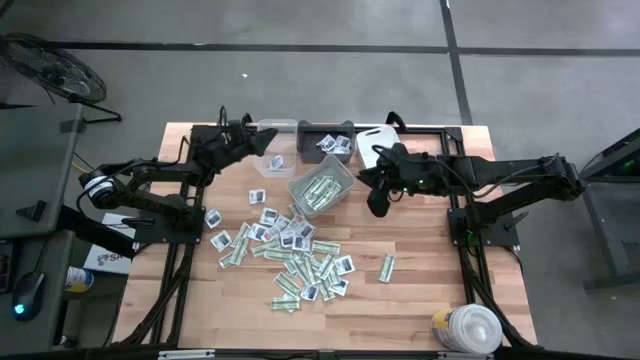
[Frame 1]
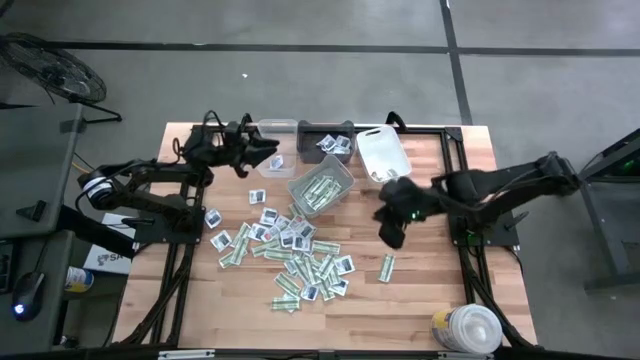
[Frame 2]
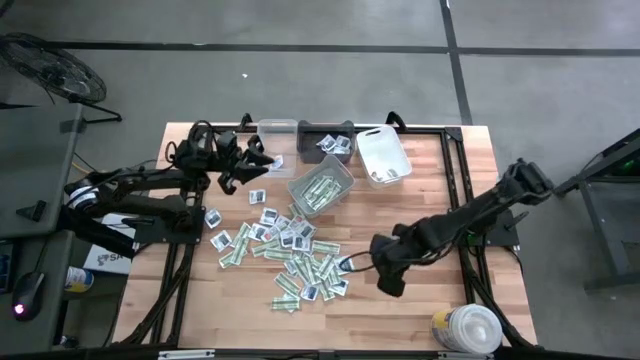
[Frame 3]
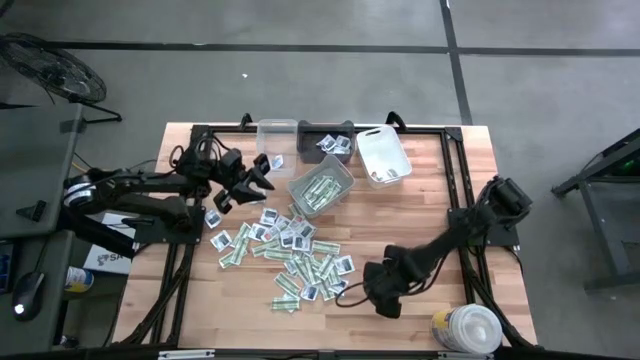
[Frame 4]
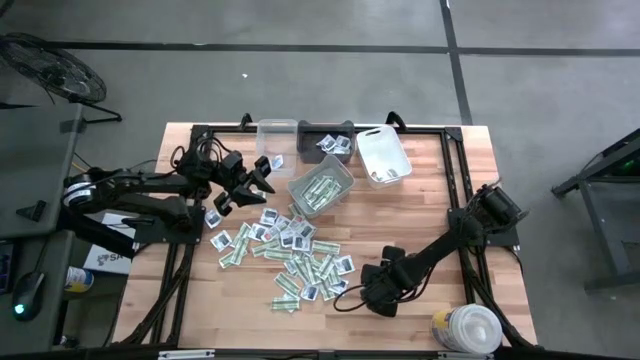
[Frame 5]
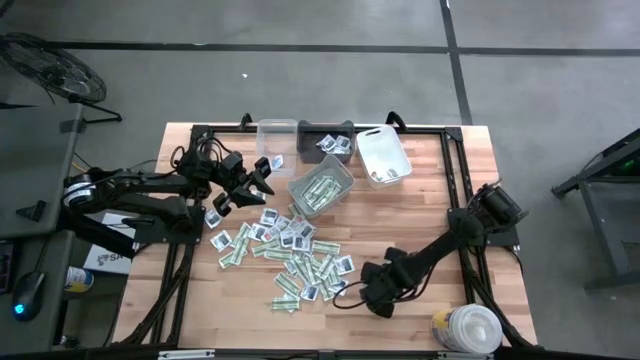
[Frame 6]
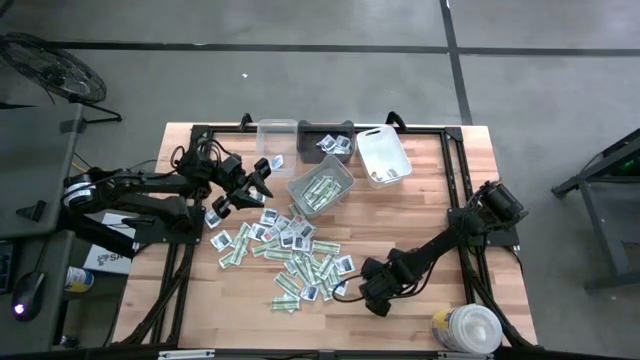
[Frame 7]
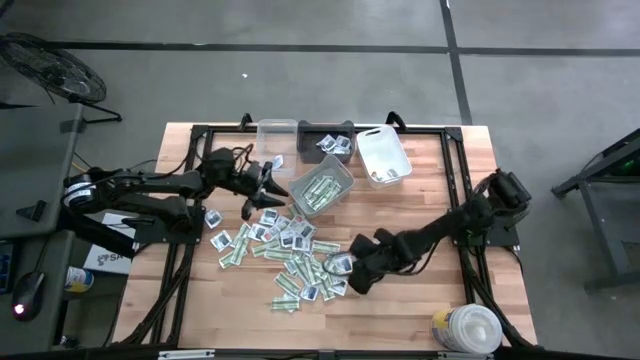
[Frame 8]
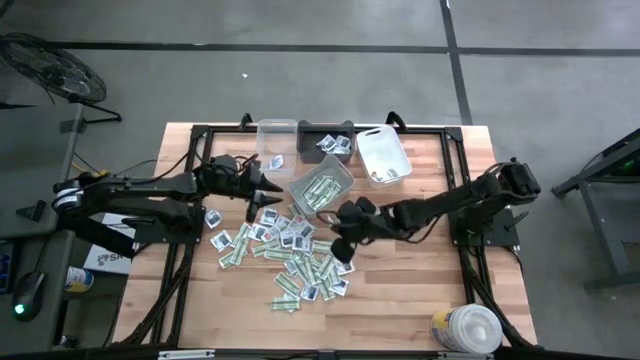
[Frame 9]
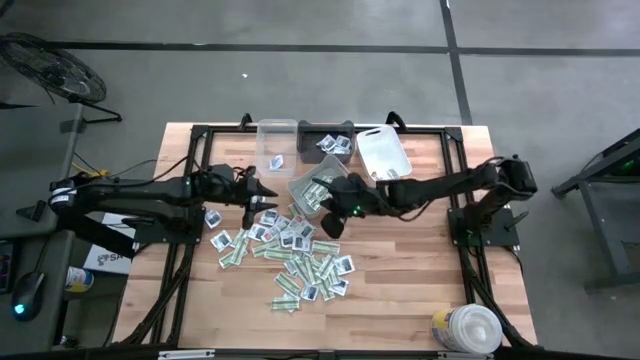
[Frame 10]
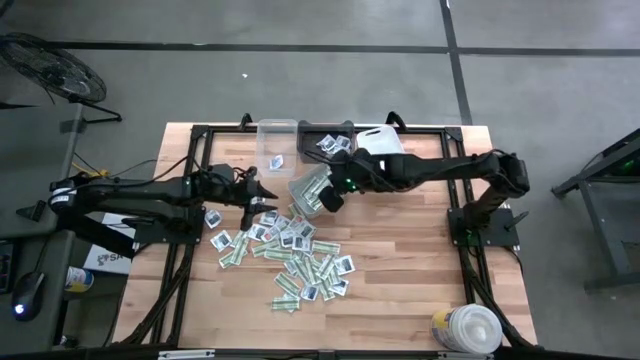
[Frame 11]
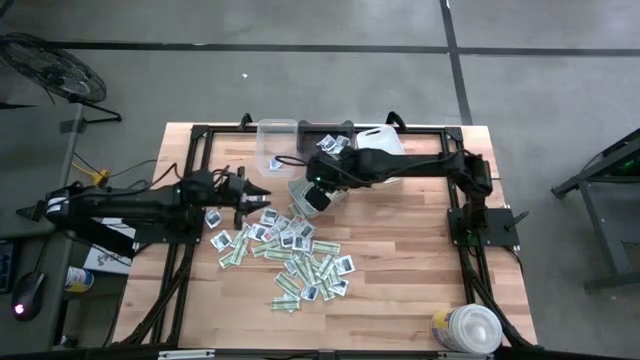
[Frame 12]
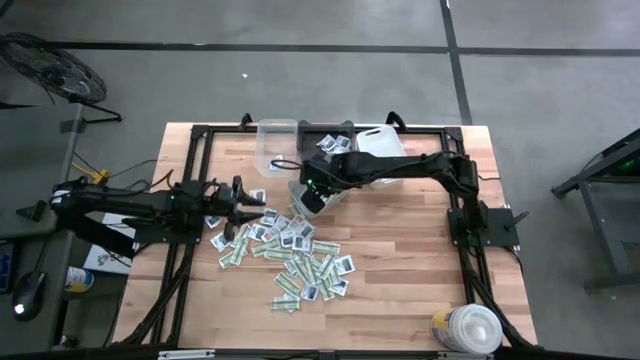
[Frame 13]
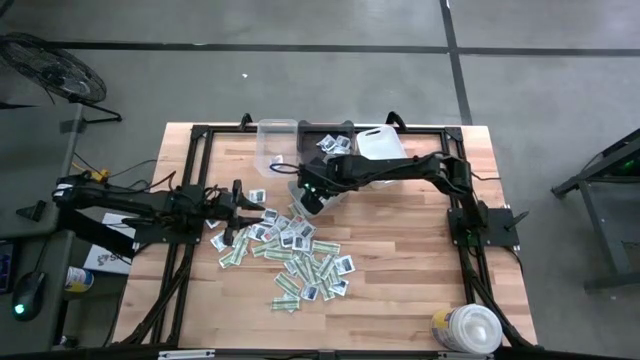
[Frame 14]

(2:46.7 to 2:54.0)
Task: Pick & Place First Aid Supplies
Put the bandage pack into the gray bin

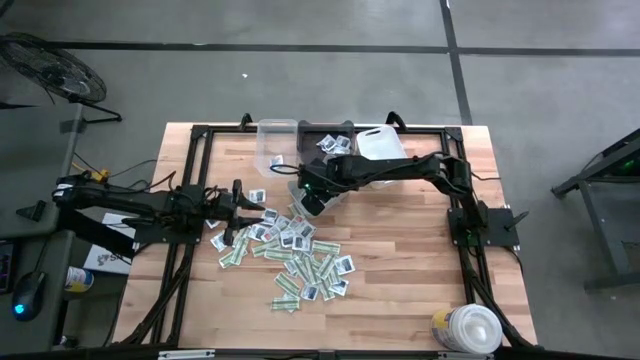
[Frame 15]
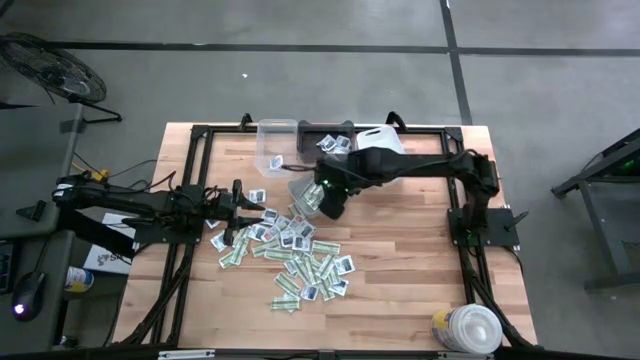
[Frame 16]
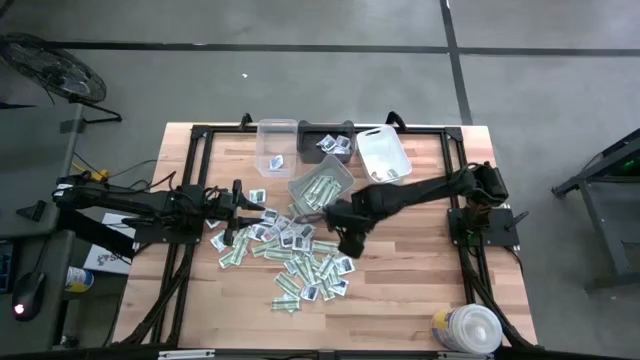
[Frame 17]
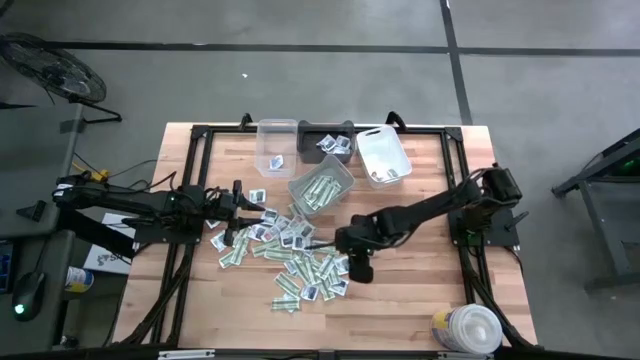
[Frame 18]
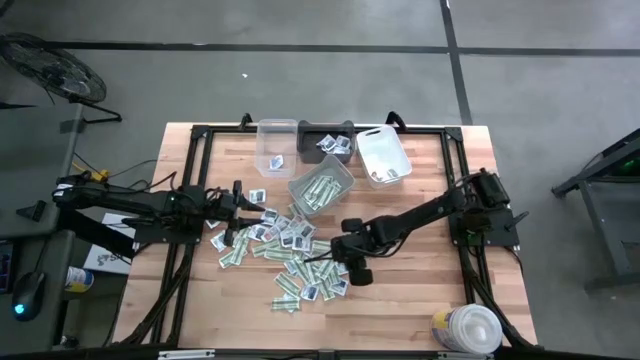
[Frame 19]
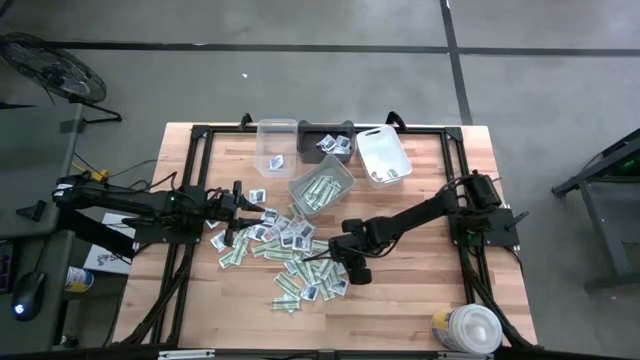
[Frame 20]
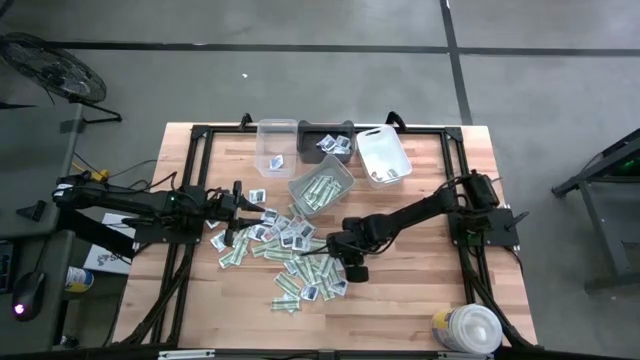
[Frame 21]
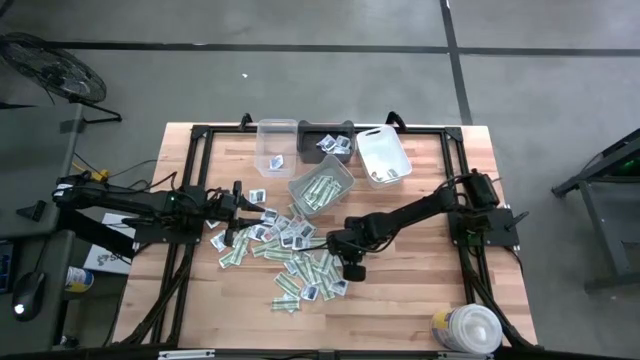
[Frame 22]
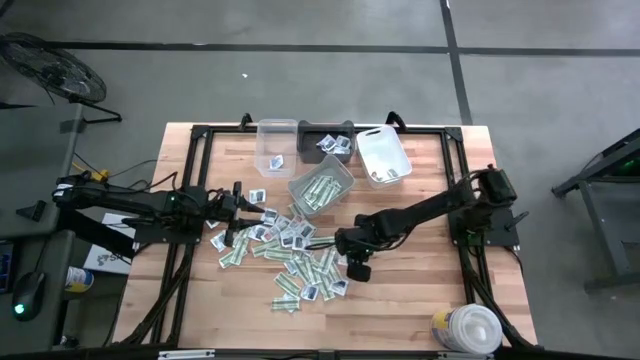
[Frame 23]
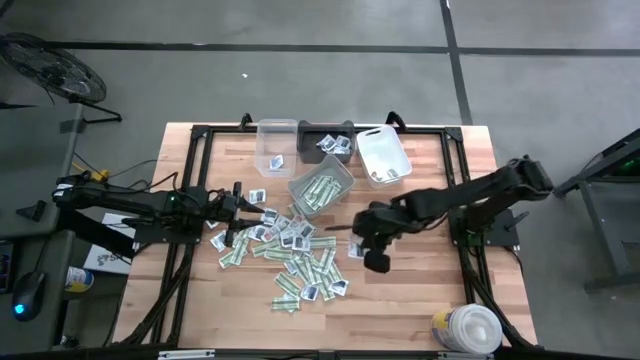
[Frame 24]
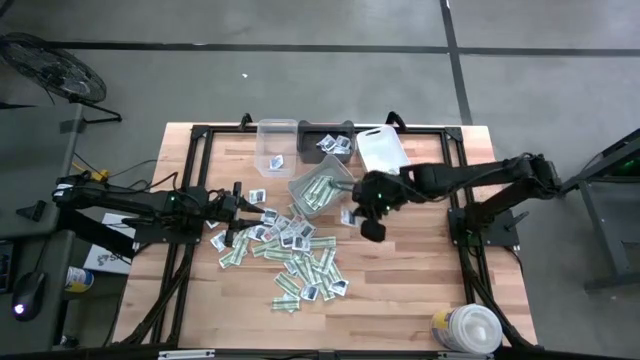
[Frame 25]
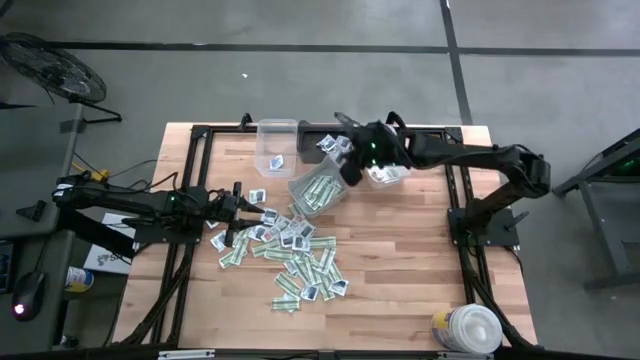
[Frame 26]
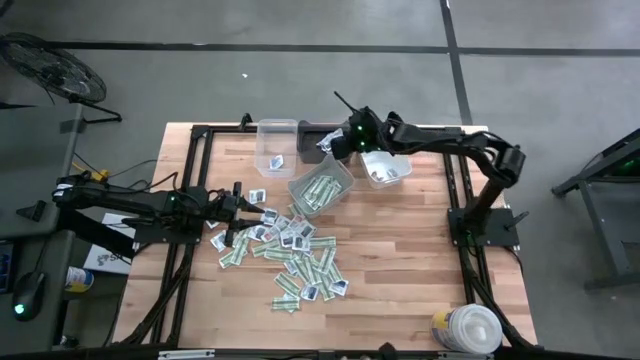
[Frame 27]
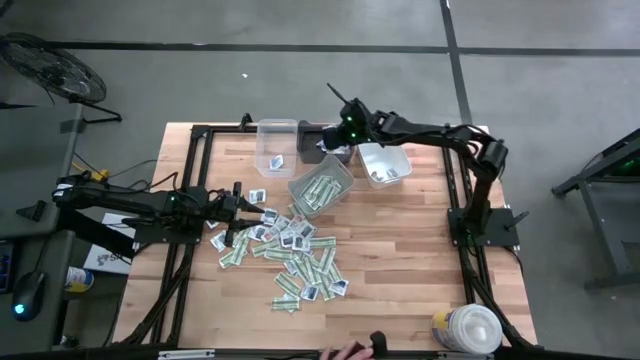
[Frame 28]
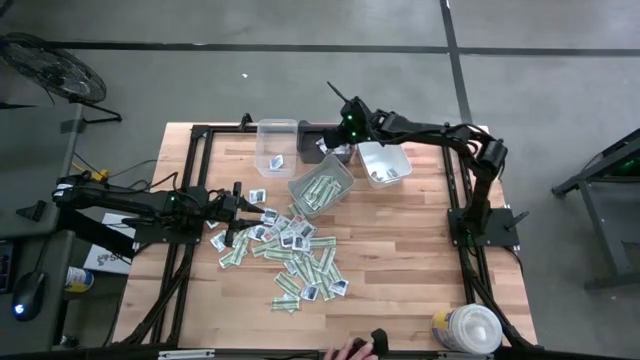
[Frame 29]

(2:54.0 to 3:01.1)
Put the towelette pack into the black bin

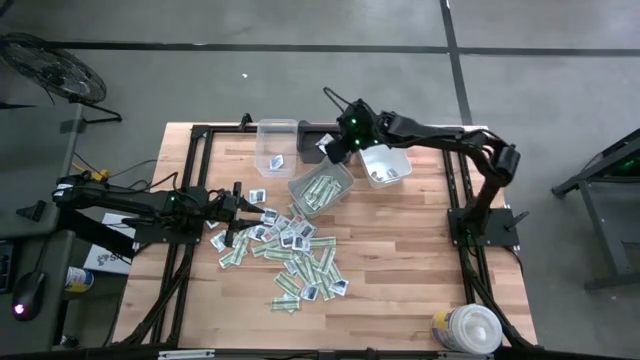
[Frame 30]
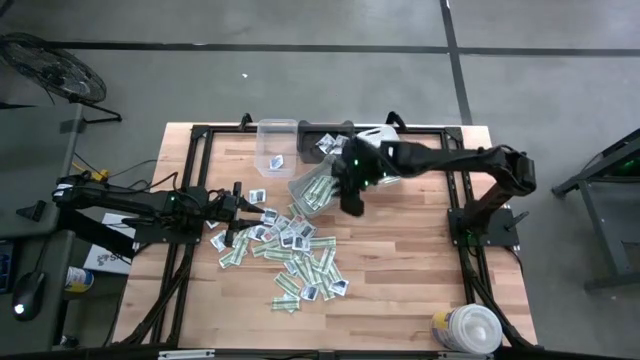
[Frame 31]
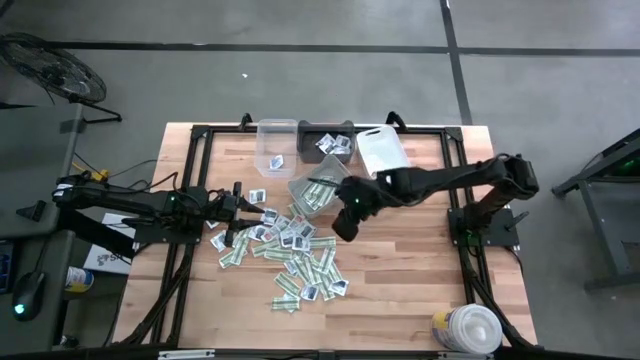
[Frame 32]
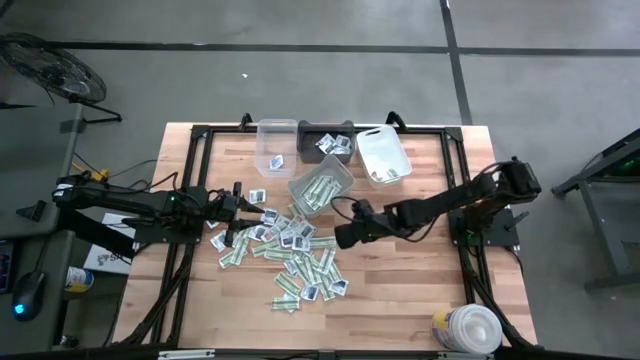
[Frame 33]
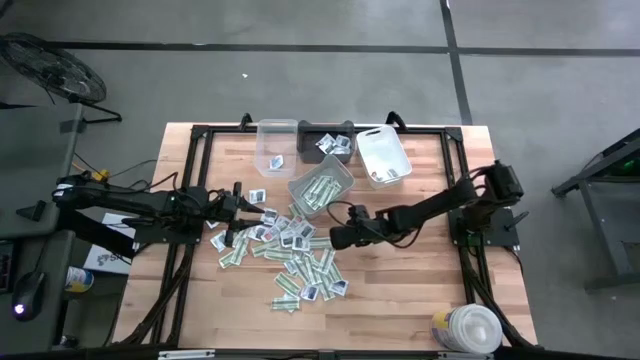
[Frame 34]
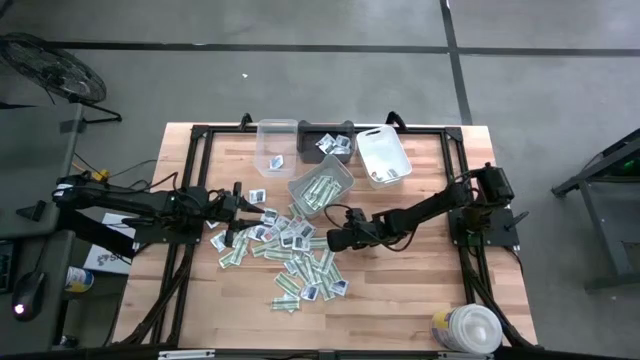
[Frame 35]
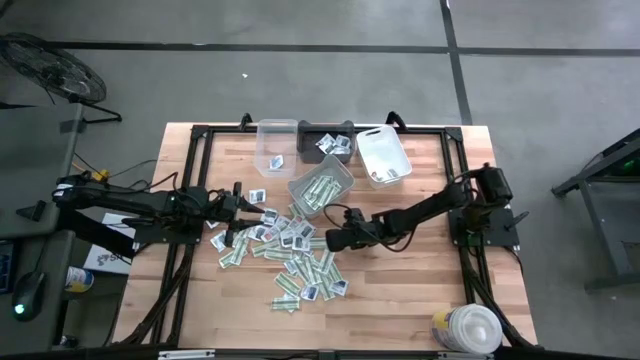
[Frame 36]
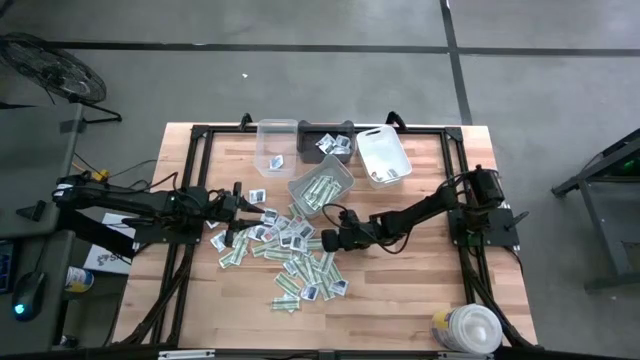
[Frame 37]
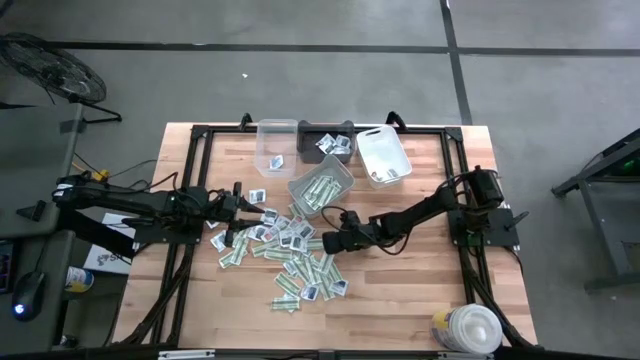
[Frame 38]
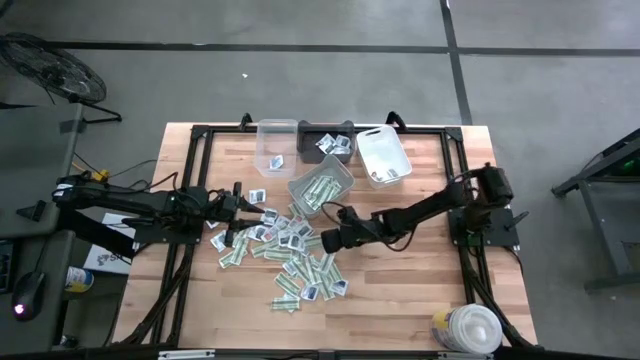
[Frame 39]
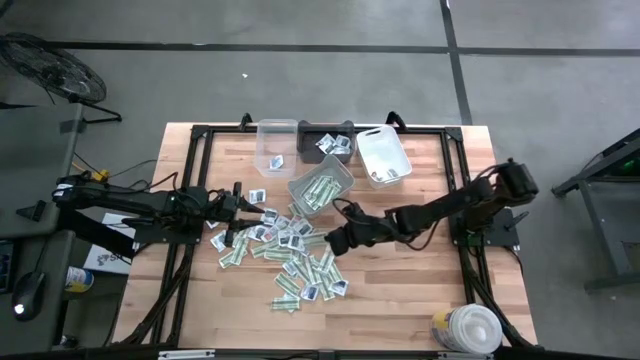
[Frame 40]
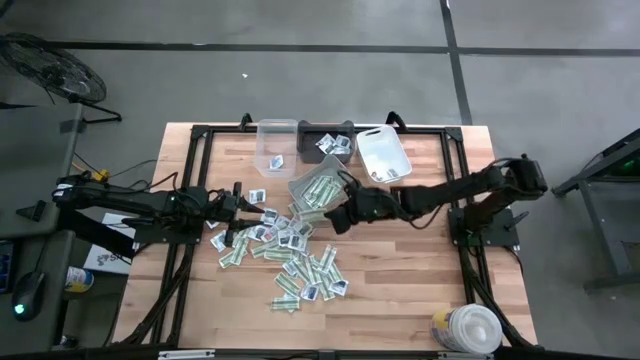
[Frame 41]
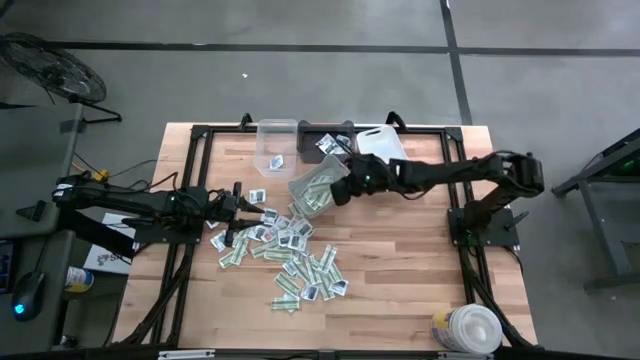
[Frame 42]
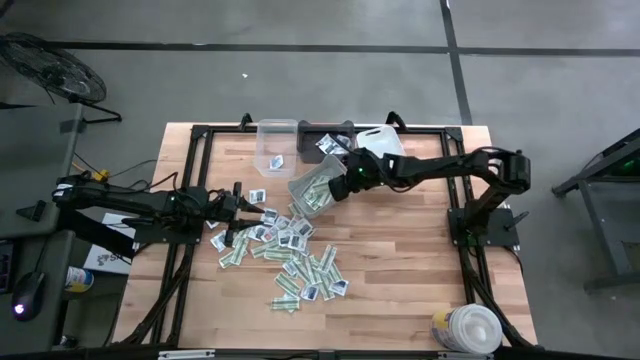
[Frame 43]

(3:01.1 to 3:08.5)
Put the bandage pack into the gray bin
